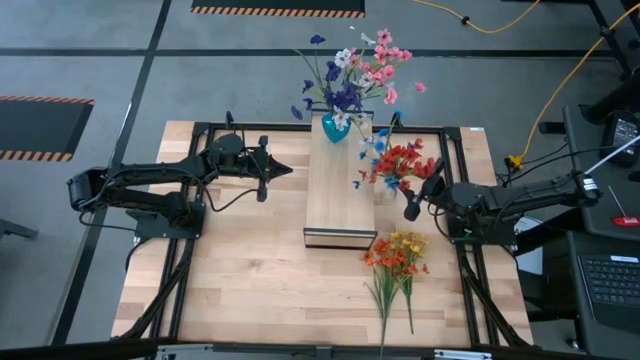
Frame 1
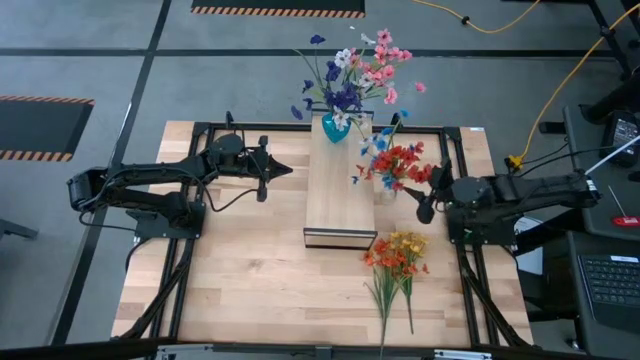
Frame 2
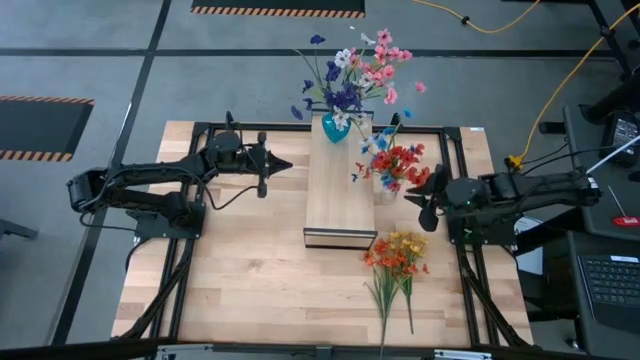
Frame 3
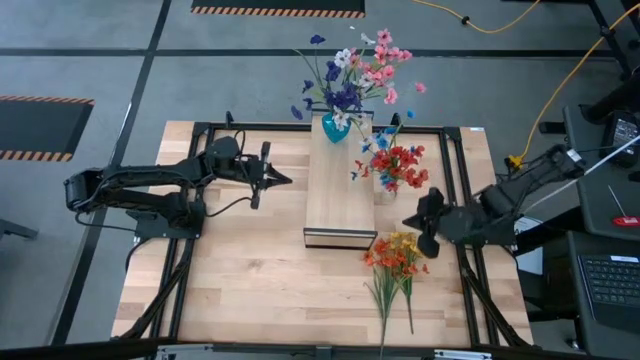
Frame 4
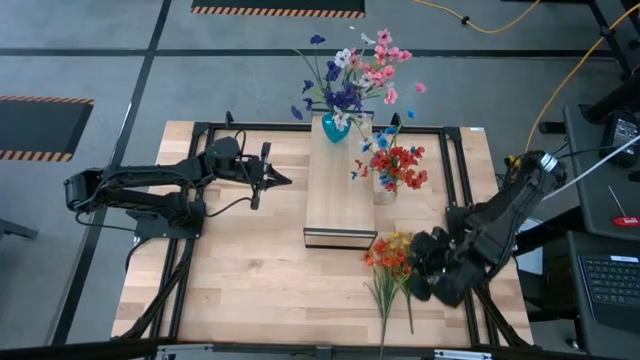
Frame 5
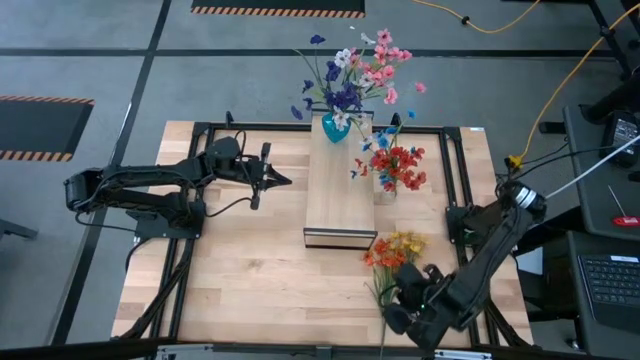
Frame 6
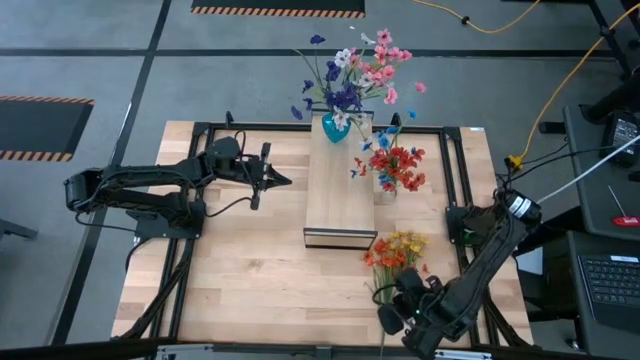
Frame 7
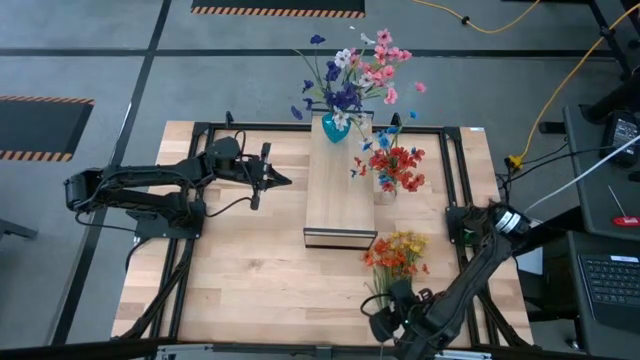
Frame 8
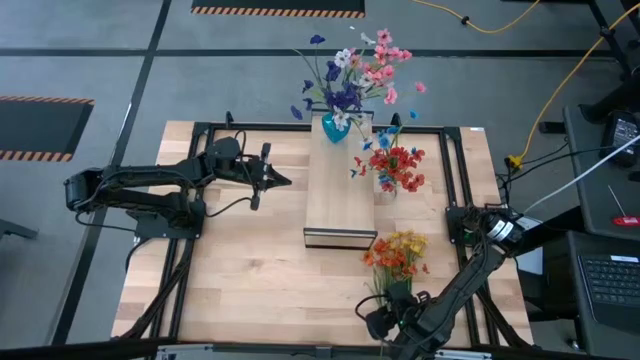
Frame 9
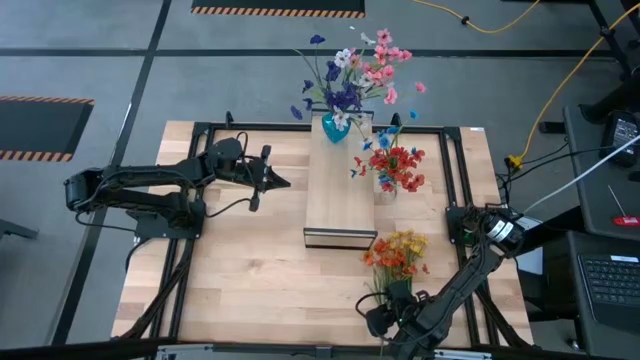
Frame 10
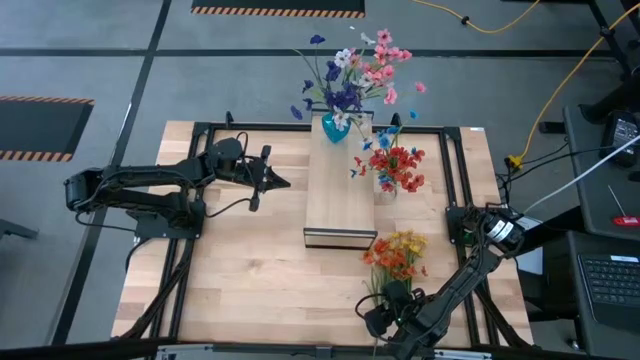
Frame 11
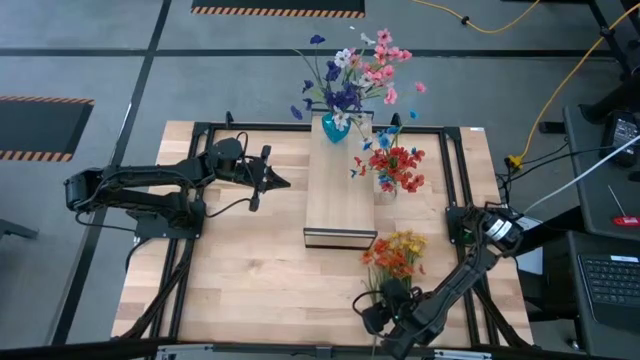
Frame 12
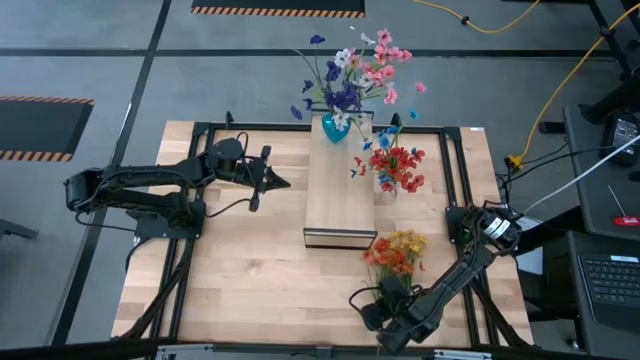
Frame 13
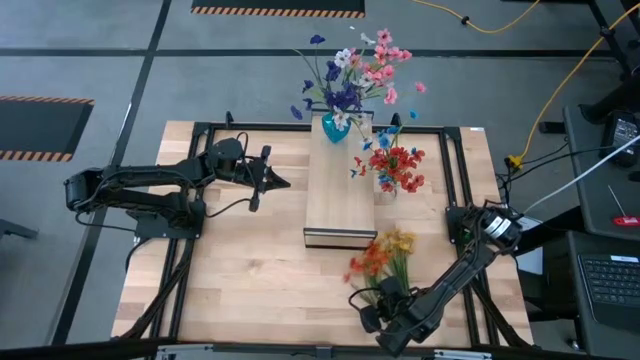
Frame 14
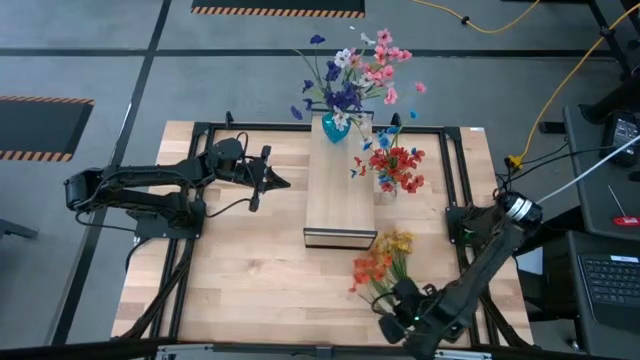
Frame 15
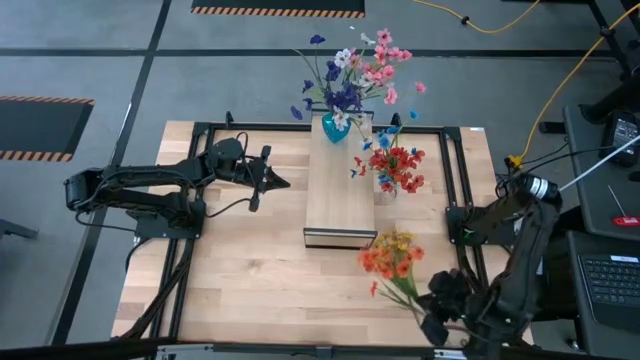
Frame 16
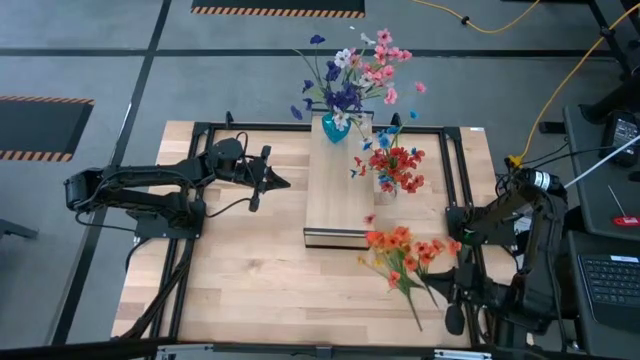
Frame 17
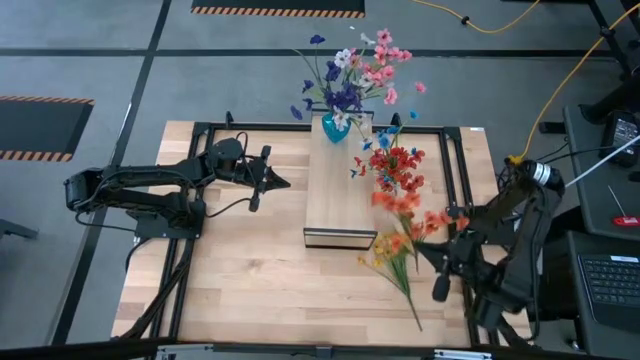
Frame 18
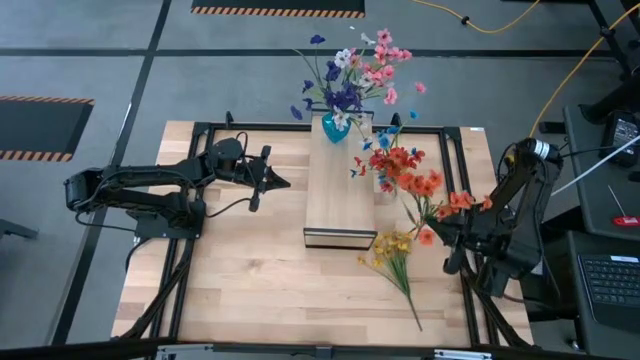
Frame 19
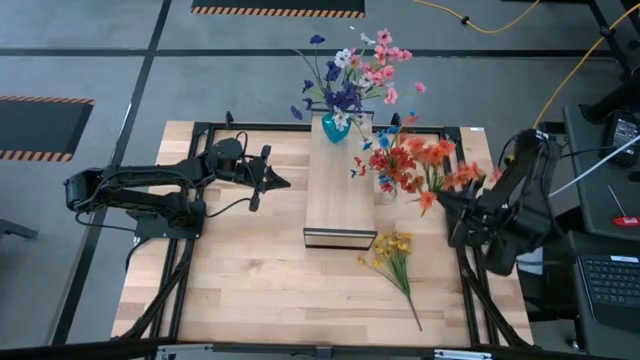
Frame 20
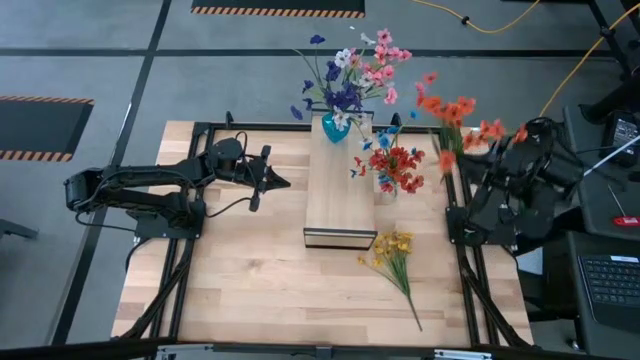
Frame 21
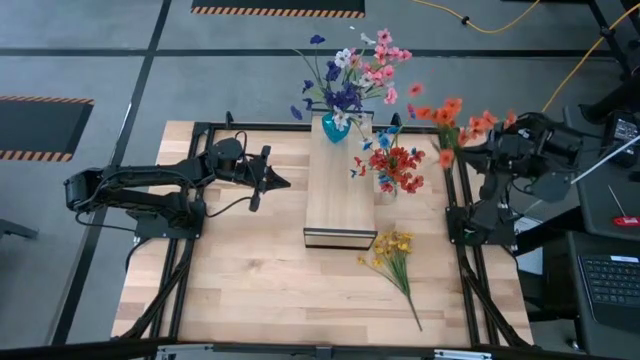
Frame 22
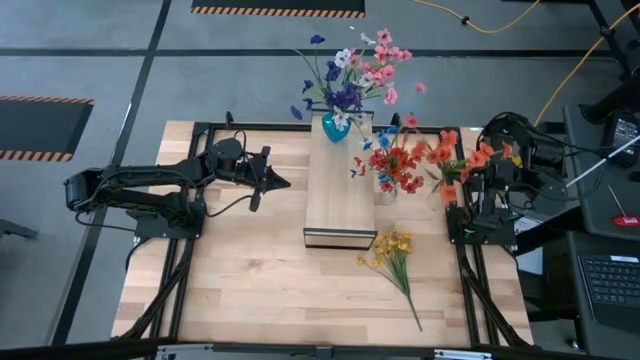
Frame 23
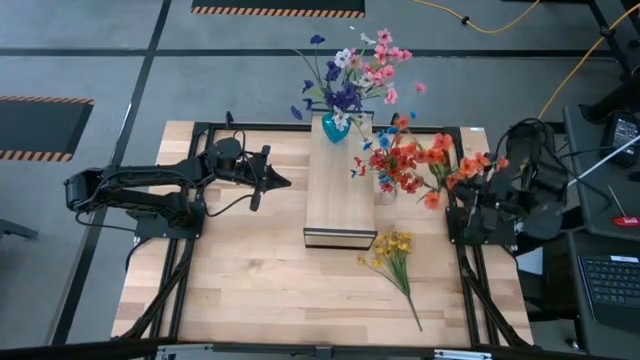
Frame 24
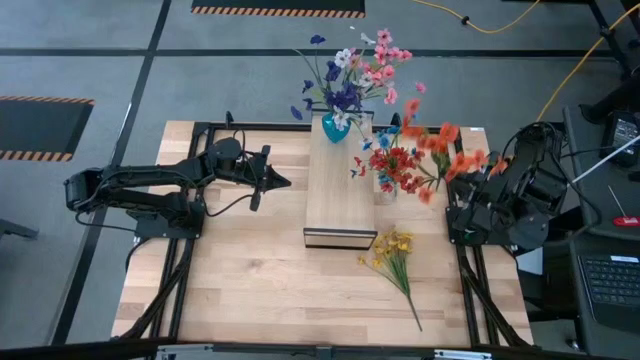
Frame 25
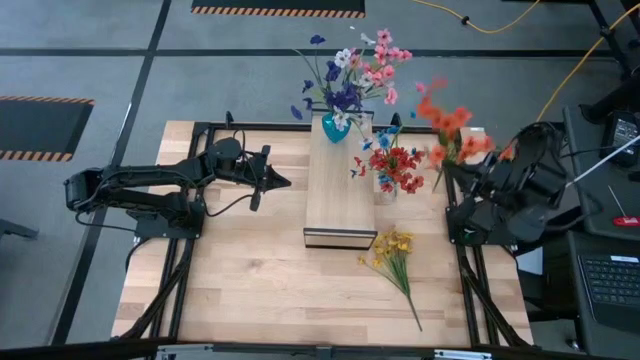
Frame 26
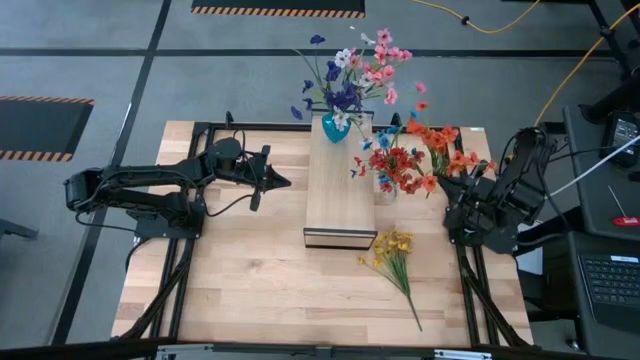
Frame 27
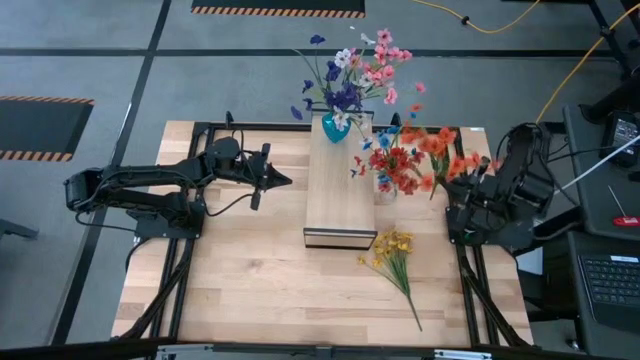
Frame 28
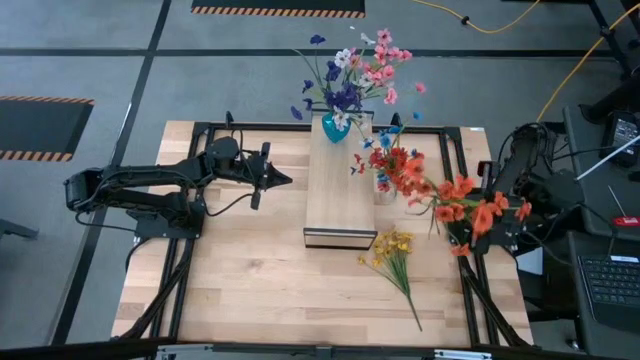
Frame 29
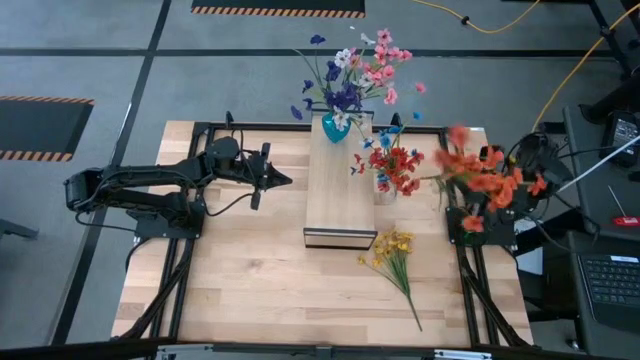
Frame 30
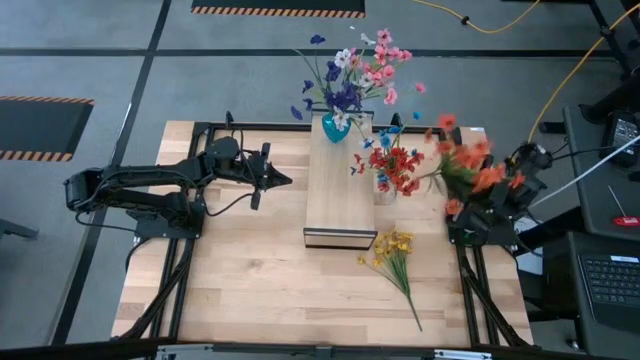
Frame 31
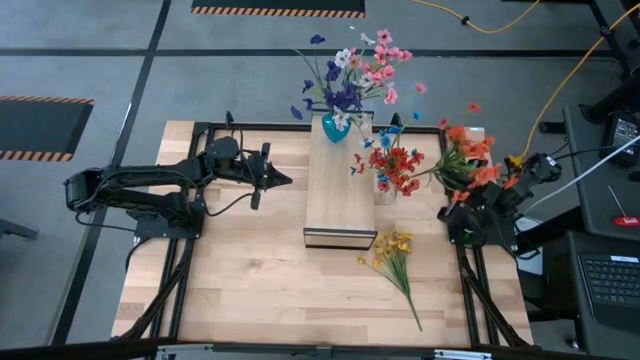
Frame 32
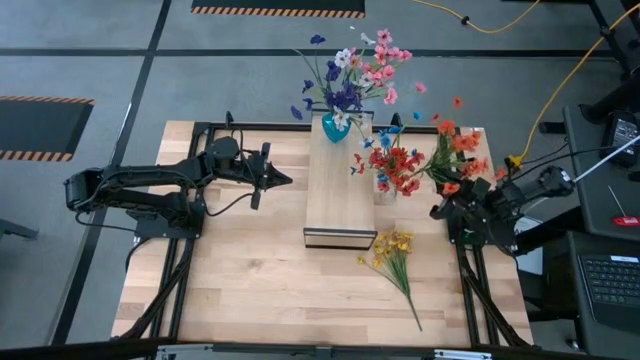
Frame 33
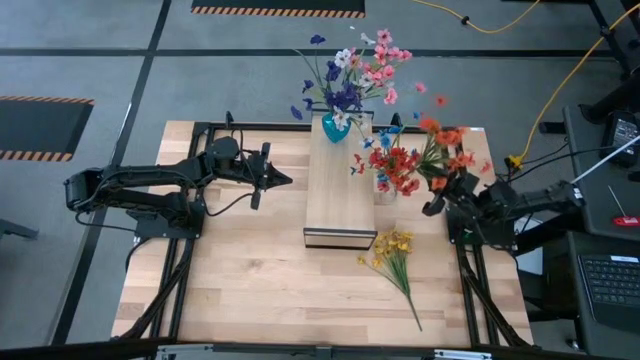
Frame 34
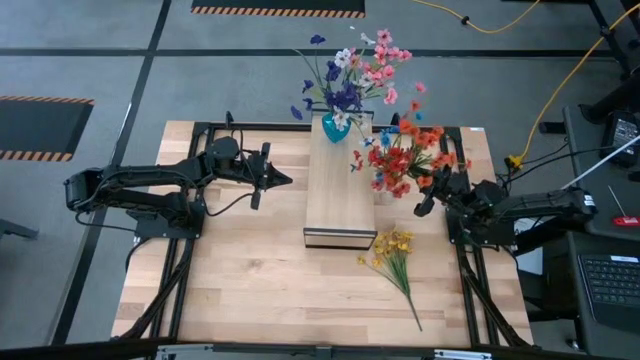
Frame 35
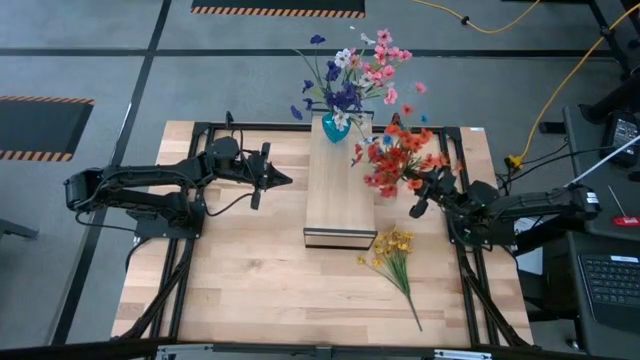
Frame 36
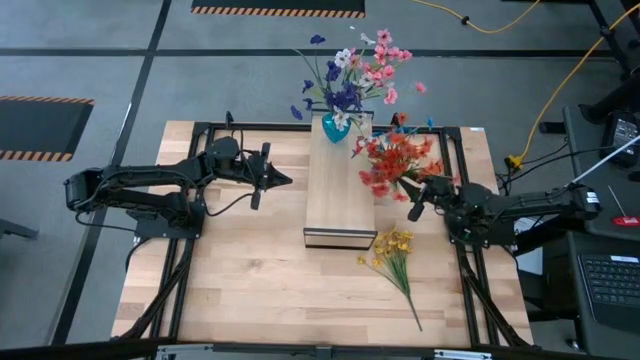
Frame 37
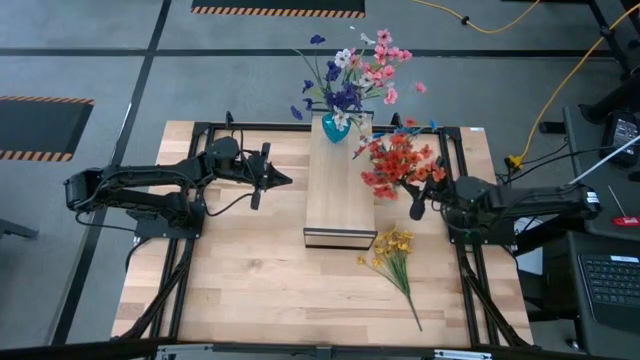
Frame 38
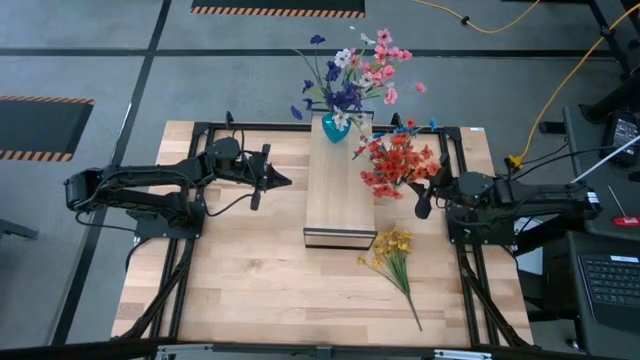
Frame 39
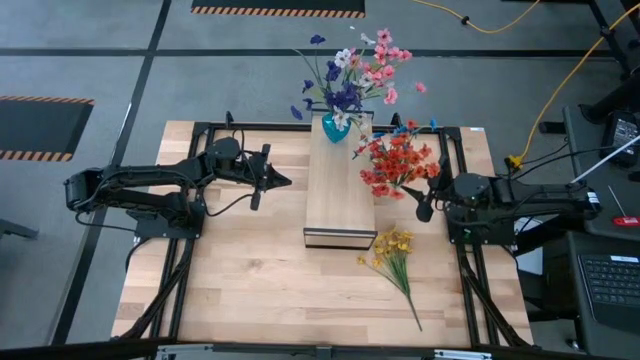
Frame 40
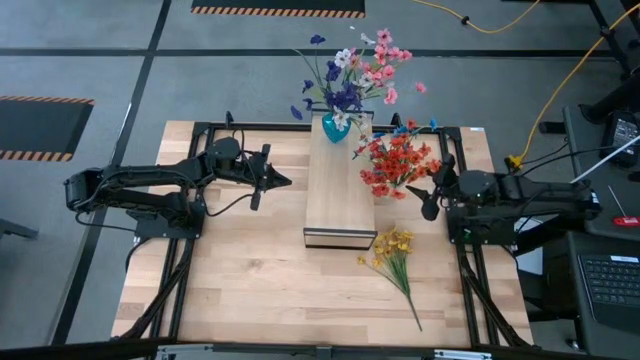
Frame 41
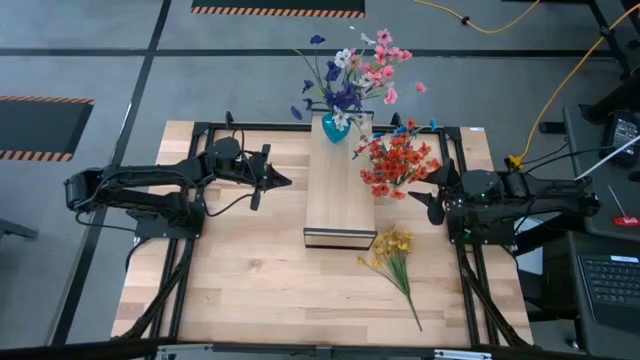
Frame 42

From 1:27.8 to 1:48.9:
Task: Pick and place flowers into a vace then onto a shelf
Put the orange flowers into the transparent vase

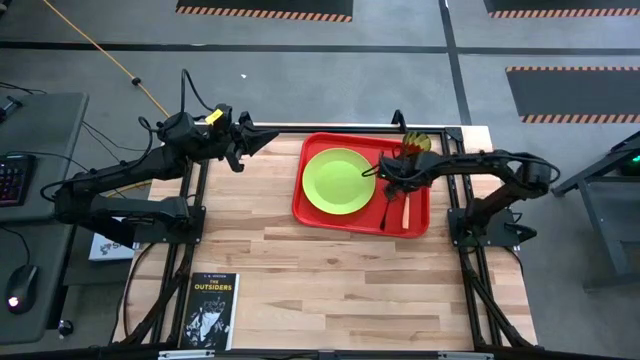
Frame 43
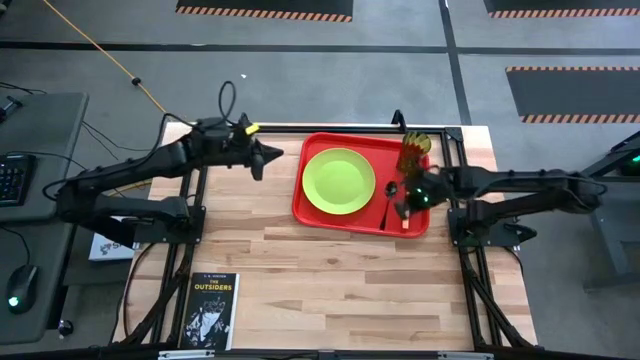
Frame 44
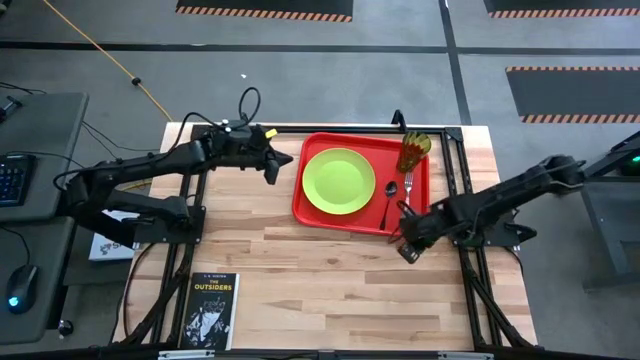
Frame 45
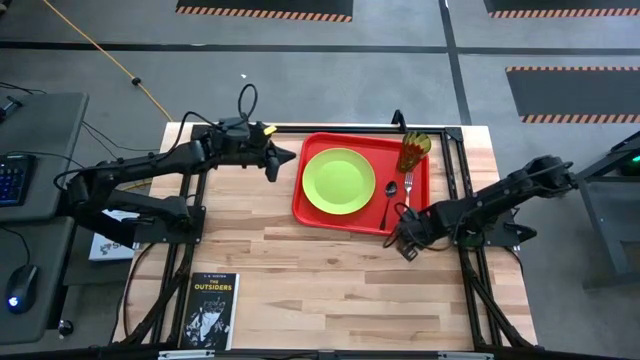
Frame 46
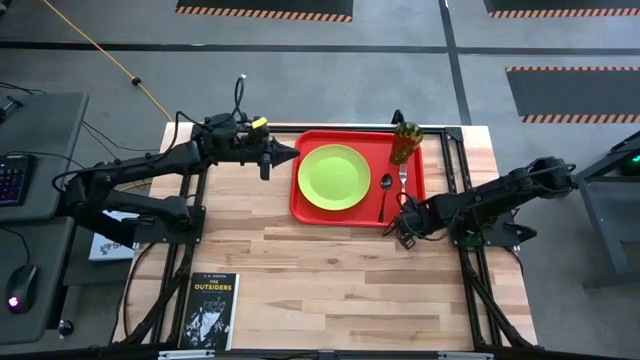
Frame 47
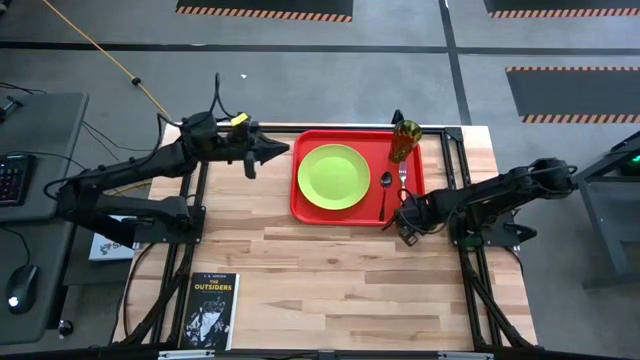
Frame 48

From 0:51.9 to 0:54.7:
Task: Pick and place plate/cup/fork/spoon on tray
Adjust the red tray
